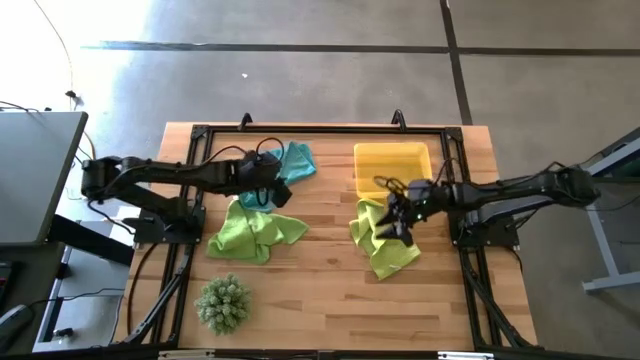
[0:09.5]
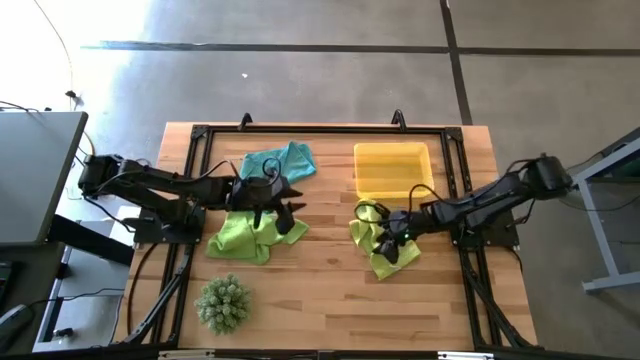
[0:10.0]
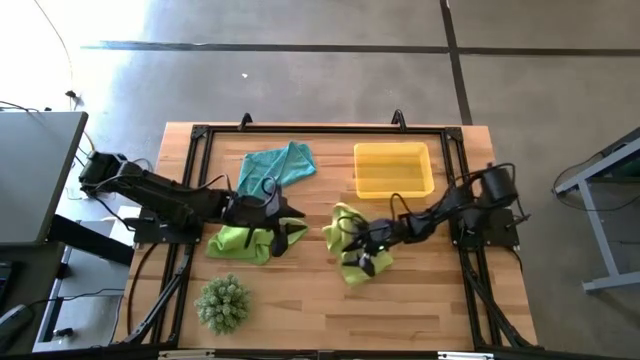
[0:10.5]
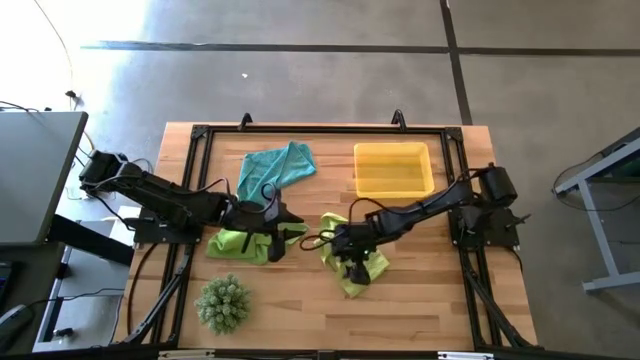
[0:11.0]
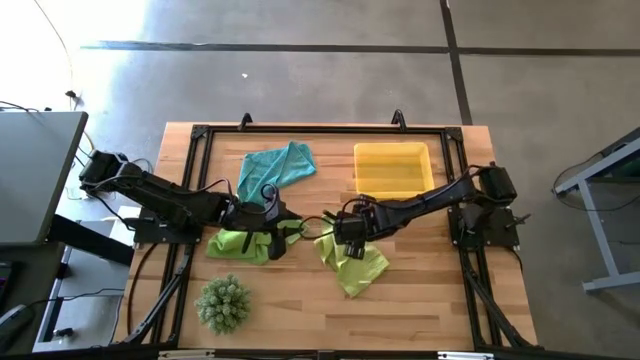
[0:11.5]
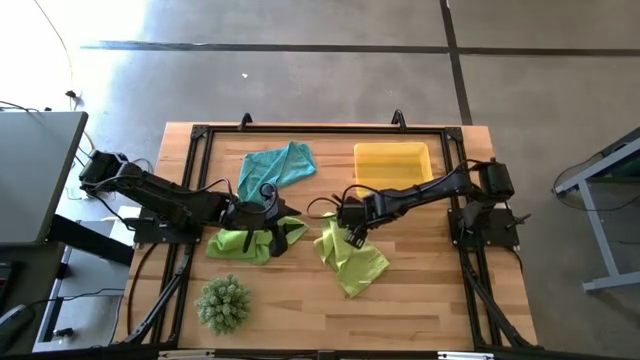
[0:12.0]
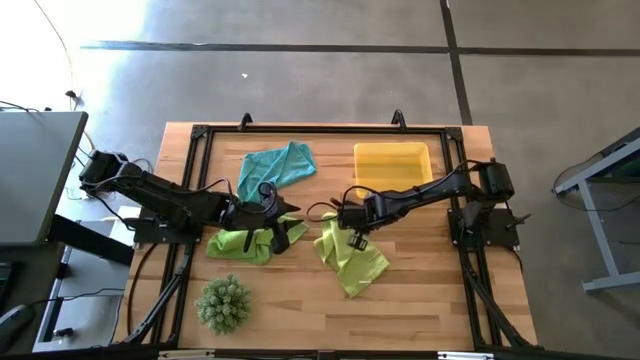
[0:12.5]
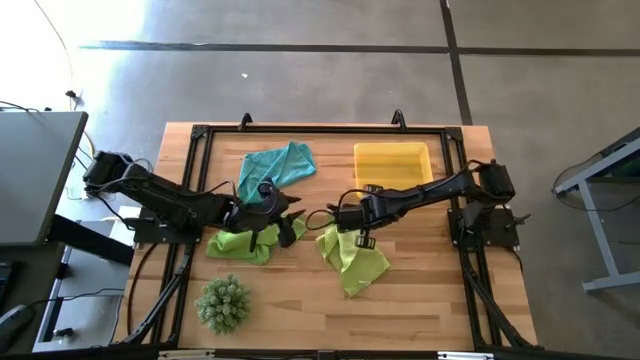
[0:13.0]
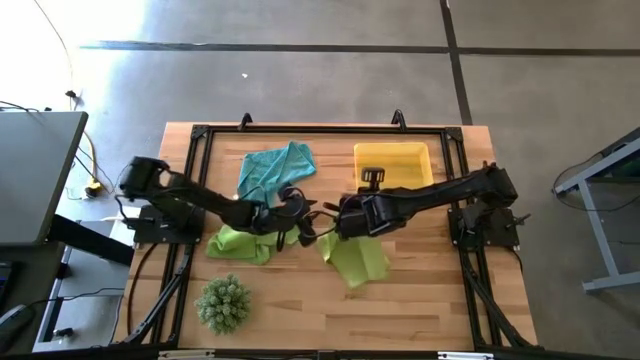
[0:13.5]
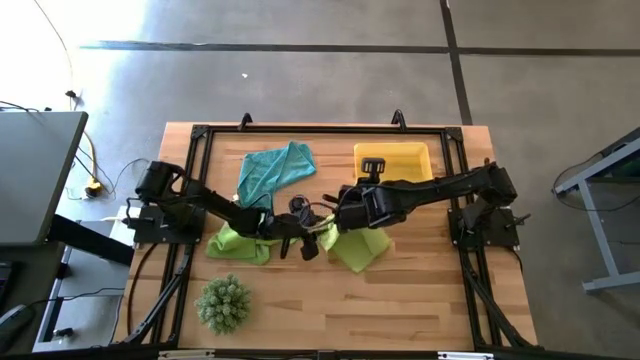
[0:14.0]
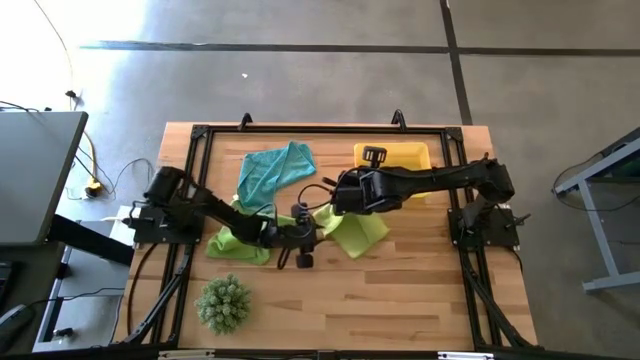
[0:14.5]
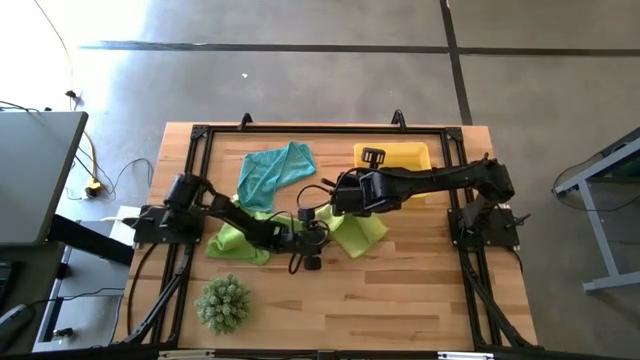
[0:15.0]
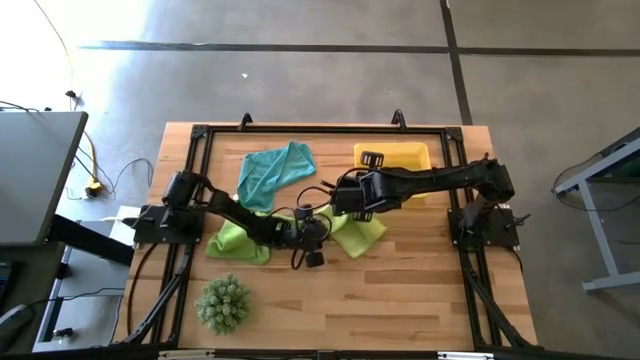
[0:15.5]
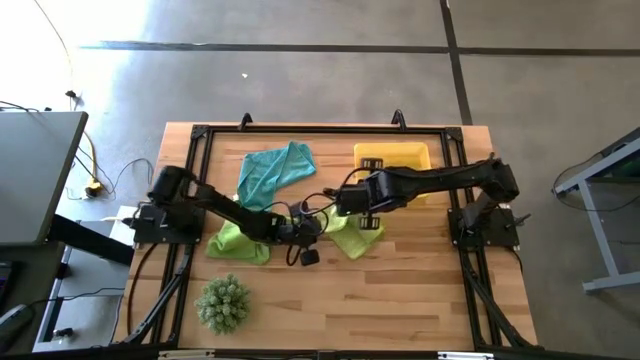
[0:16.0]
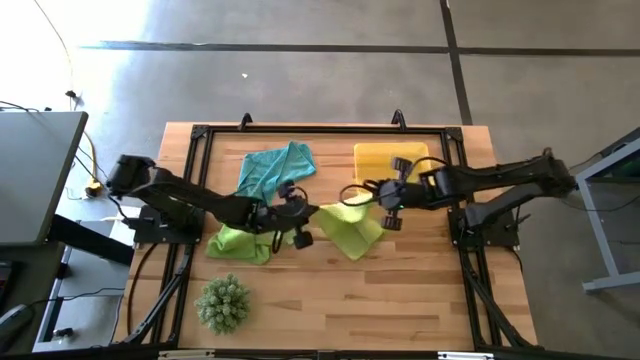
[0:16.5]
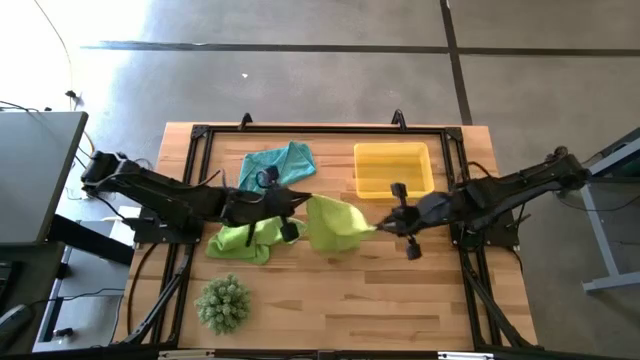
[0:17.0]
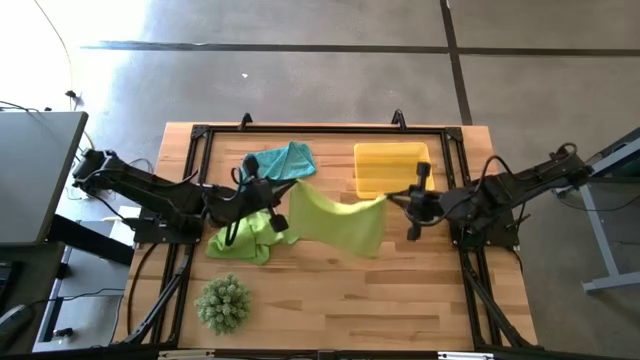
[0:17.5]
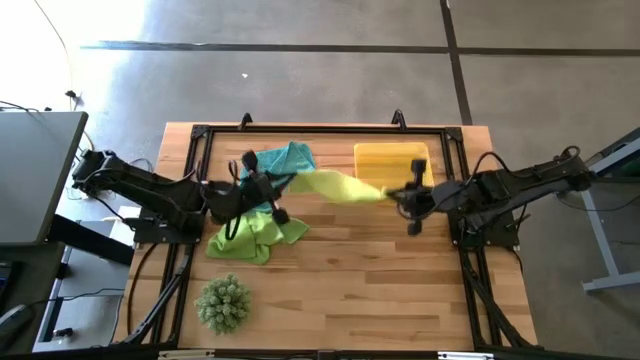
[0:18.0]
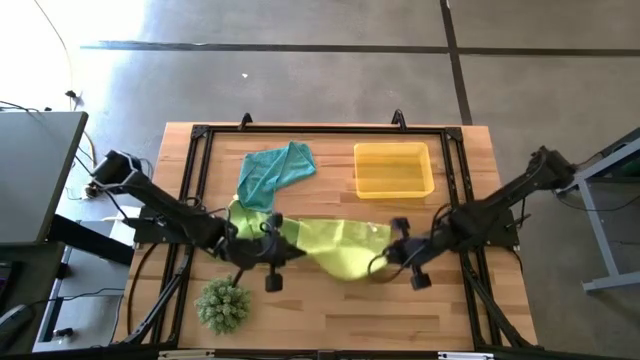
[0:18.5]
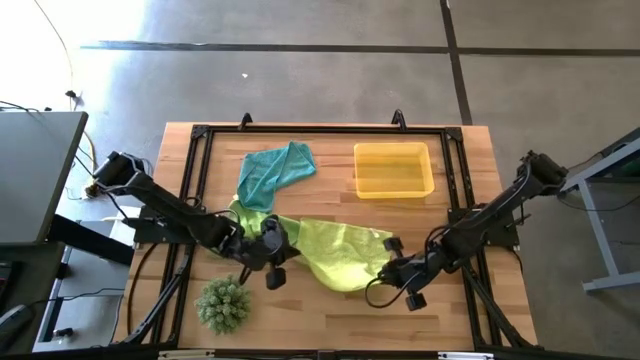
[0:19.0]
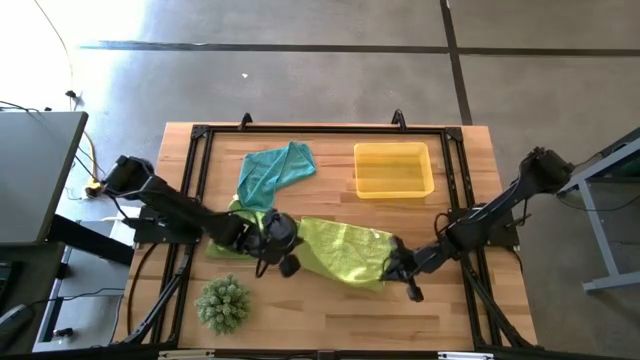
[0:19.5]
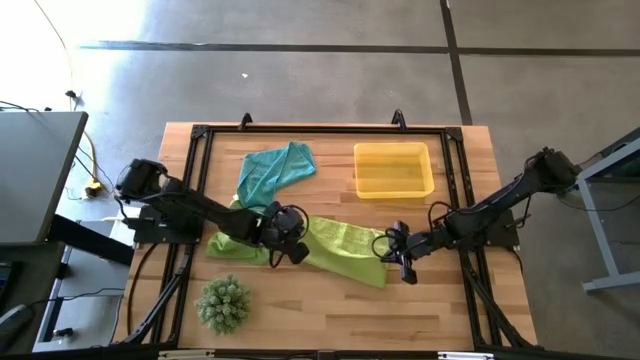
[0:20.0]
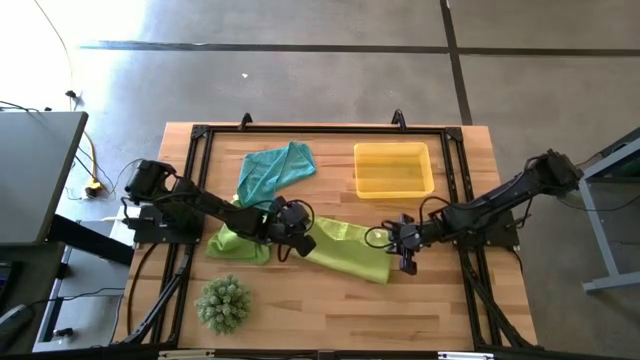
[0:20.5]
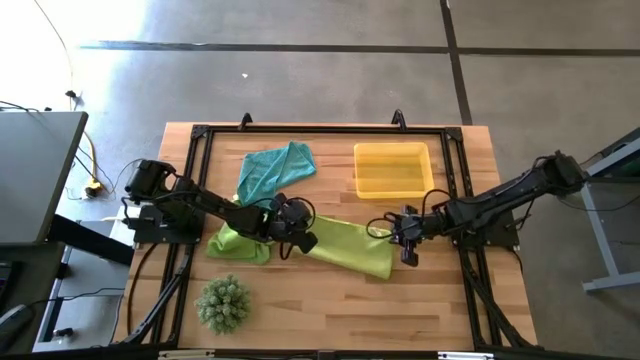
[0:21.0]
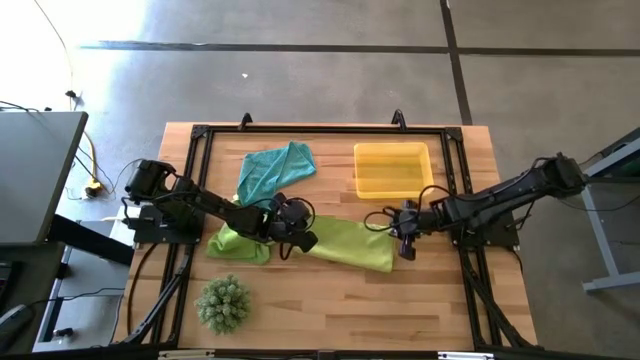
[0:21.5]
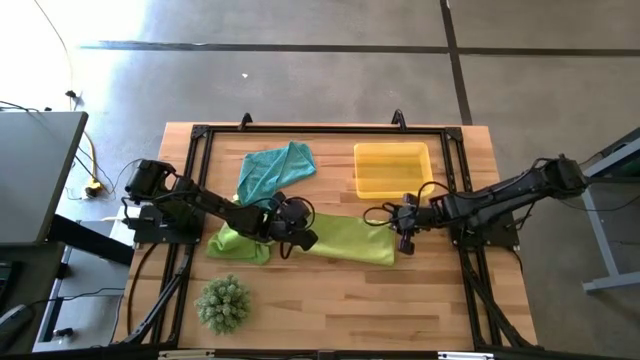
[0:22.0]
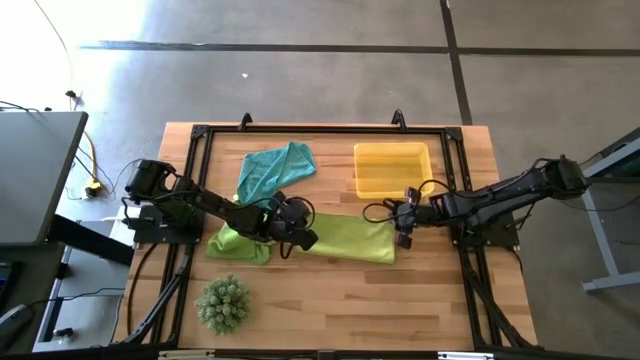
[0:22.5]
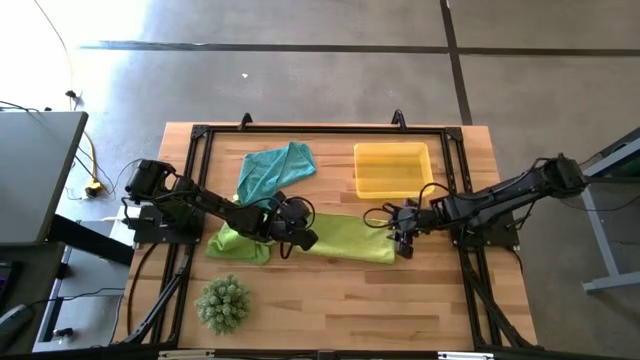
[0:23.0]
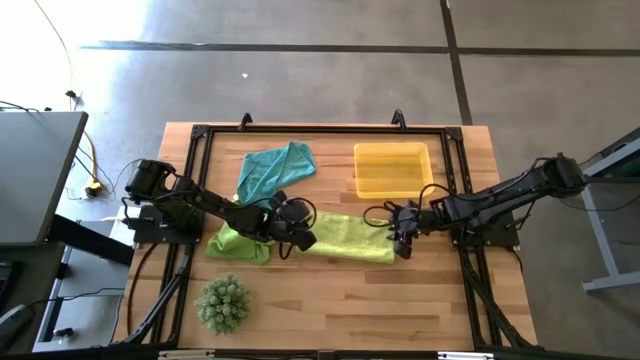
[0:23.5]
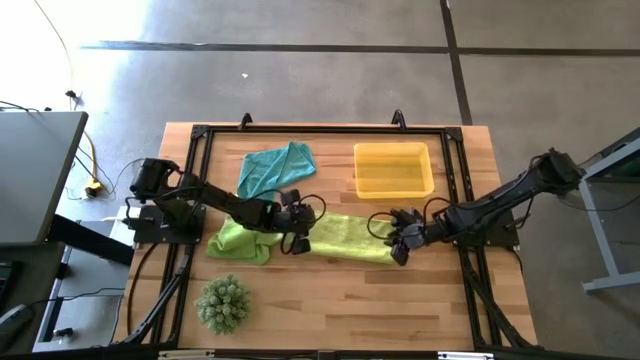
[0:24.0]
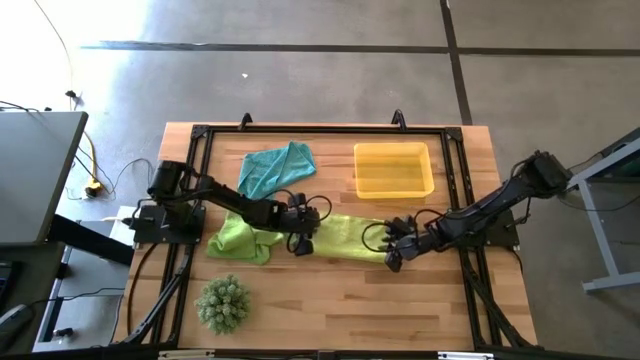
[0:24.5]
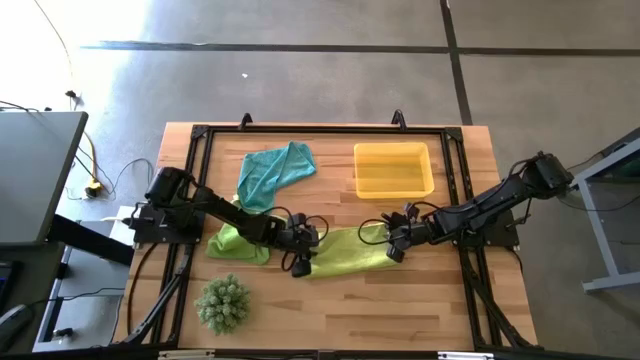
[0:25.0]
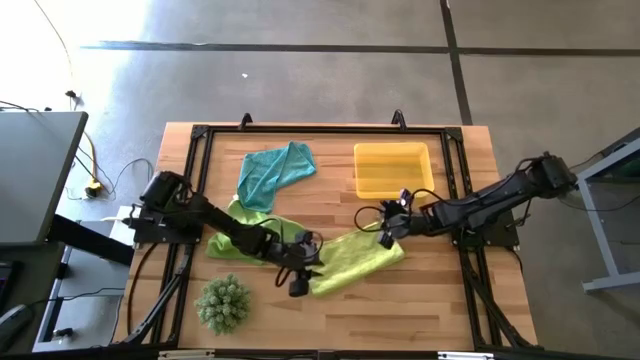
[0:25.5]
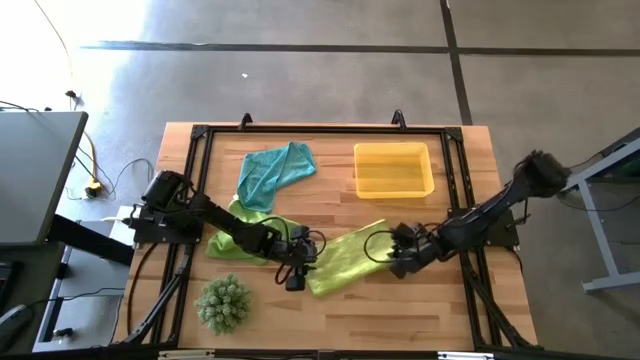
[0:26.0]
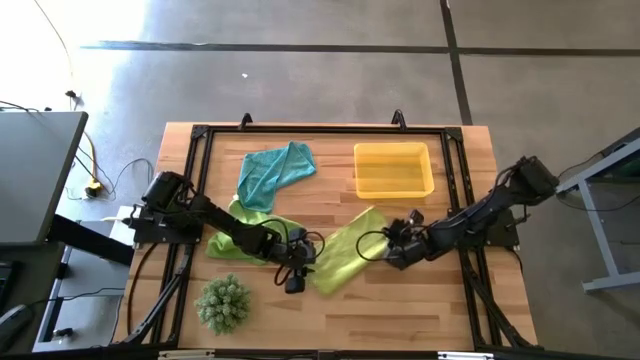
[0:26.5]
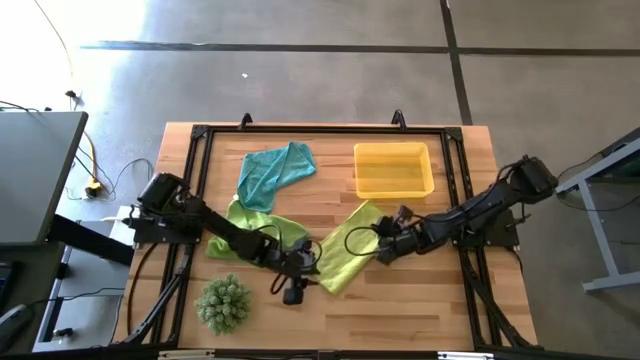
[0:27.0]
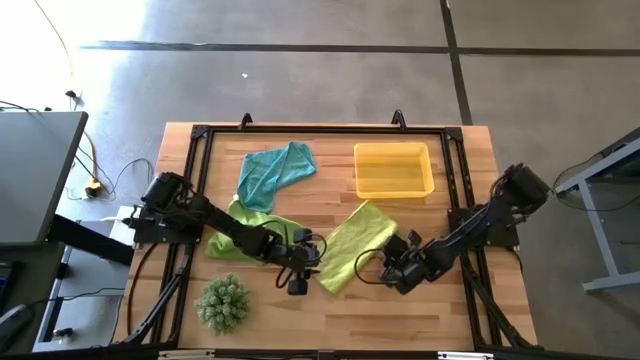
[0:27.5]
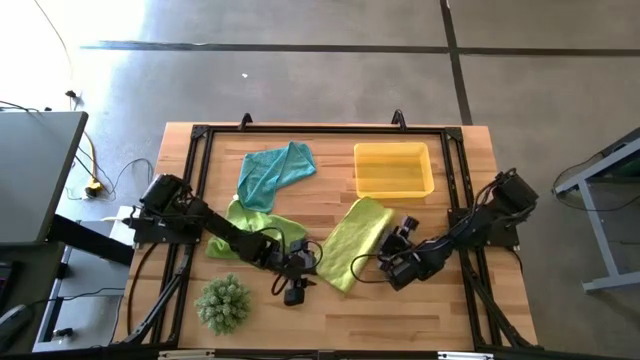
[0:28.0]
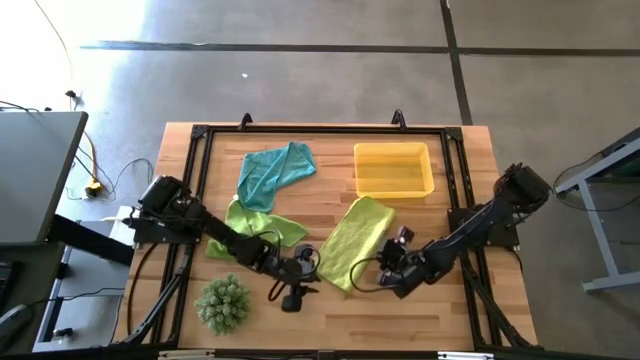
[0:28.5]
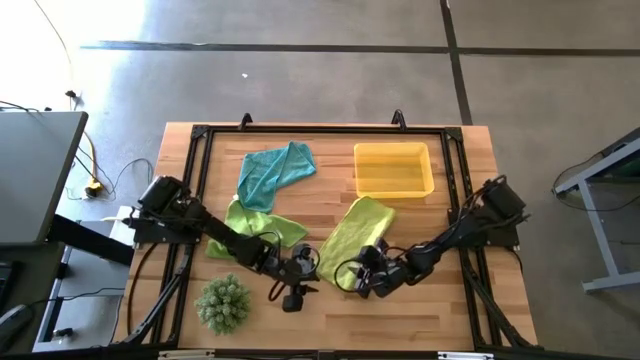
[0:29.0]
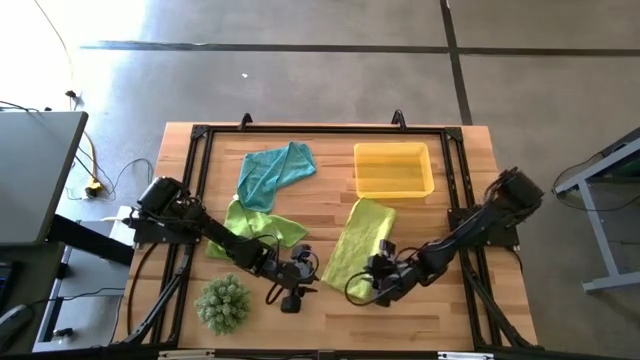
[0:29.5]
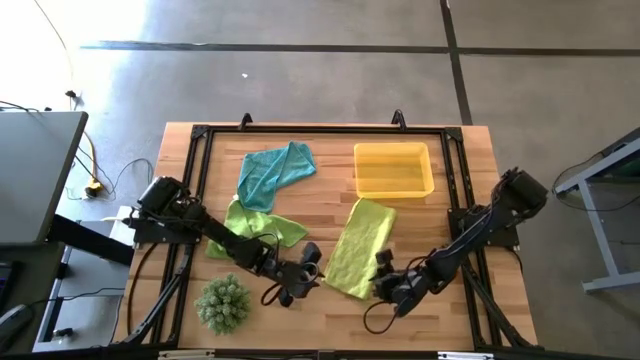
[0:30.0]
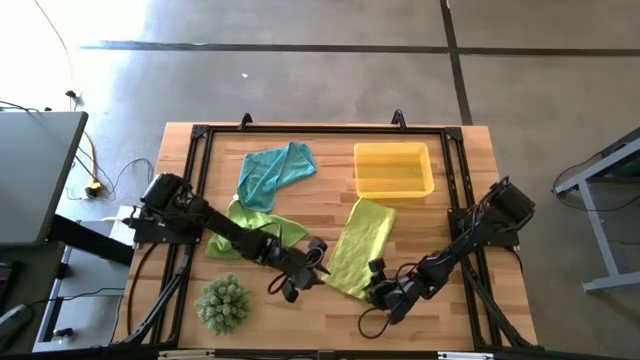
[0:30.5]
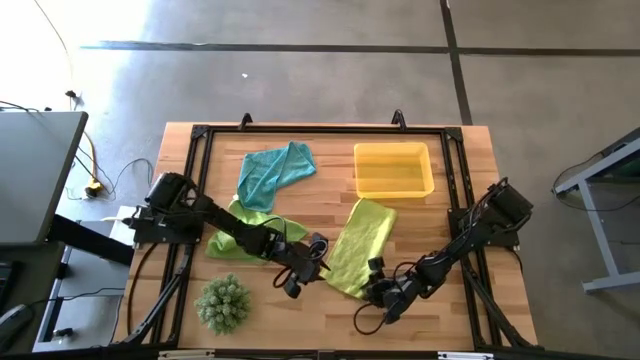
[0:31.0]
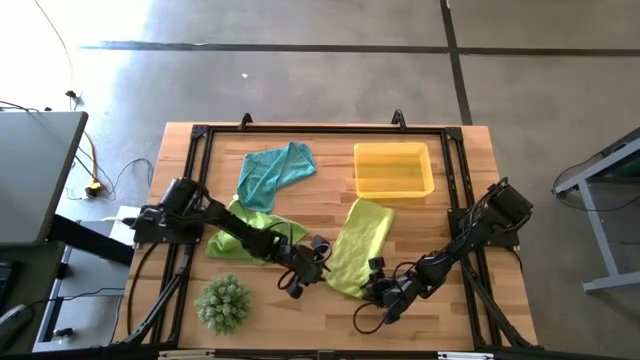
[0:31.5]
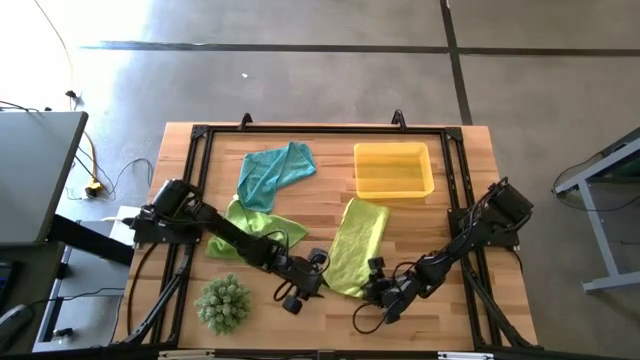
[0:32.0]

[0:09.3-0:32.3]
Task: Roll microfiber towels into tight, uniform cylinder then place into a basket
Roll the light green towel
